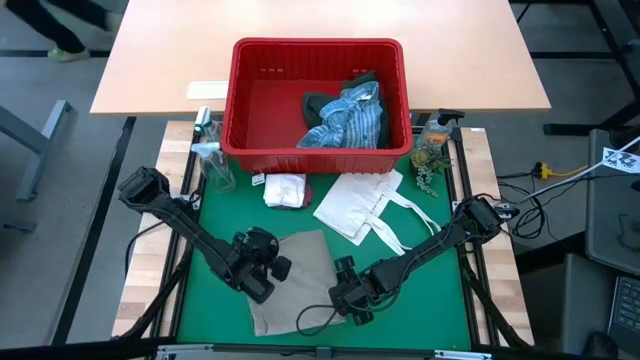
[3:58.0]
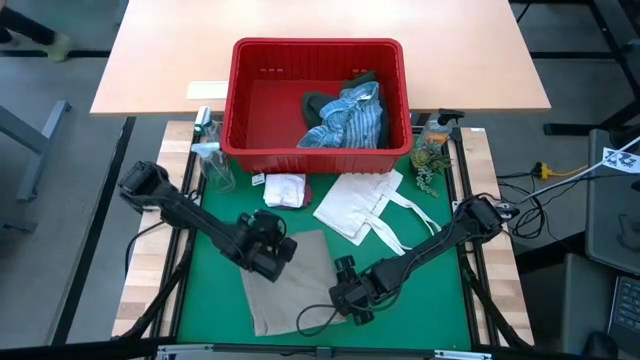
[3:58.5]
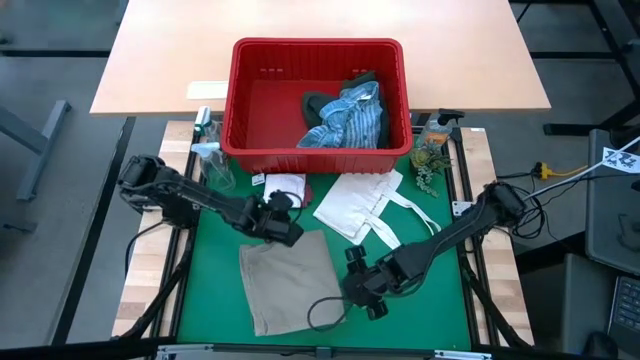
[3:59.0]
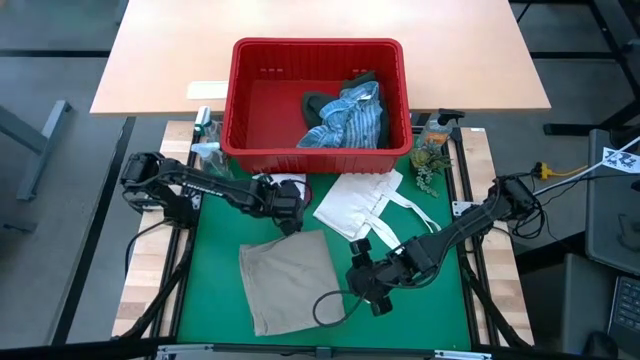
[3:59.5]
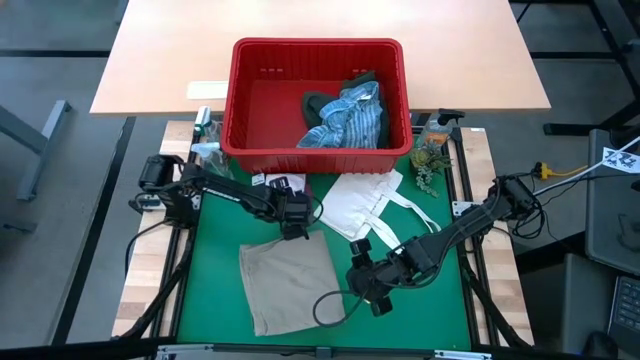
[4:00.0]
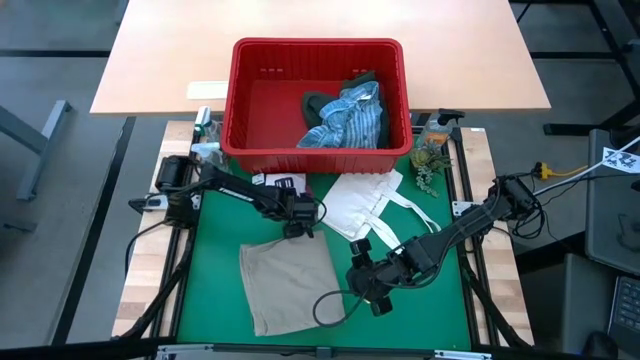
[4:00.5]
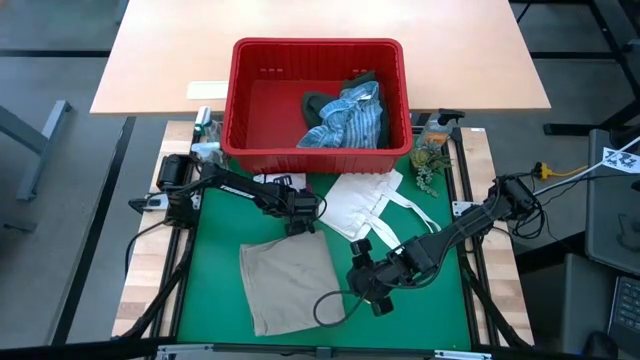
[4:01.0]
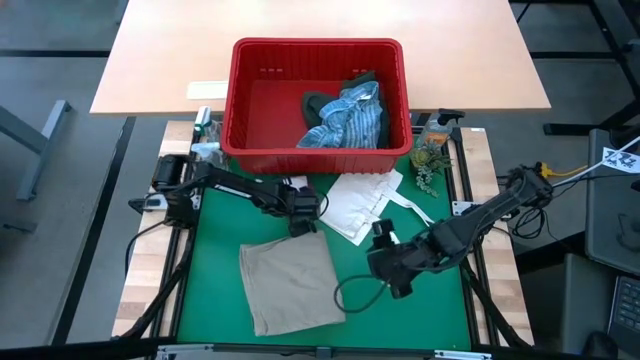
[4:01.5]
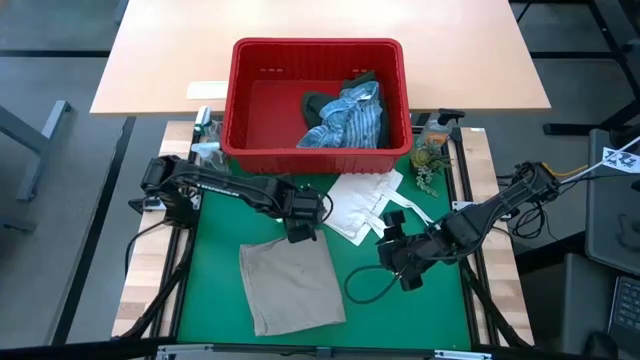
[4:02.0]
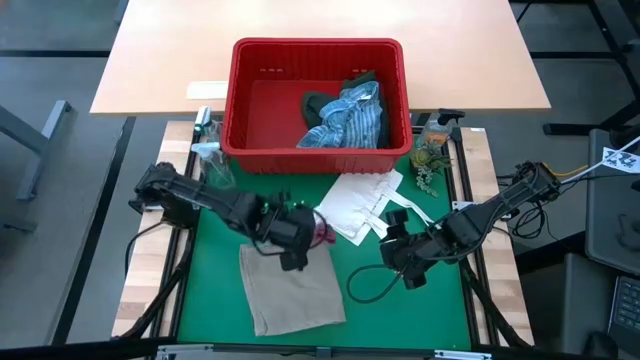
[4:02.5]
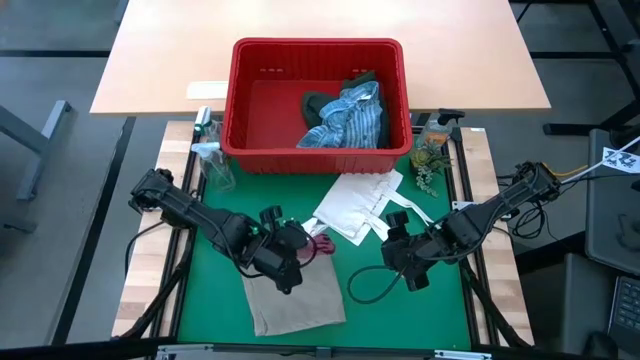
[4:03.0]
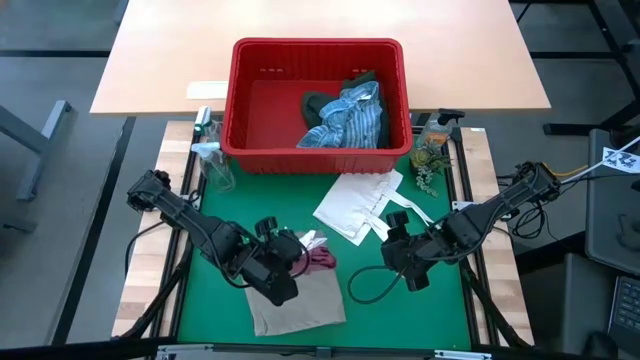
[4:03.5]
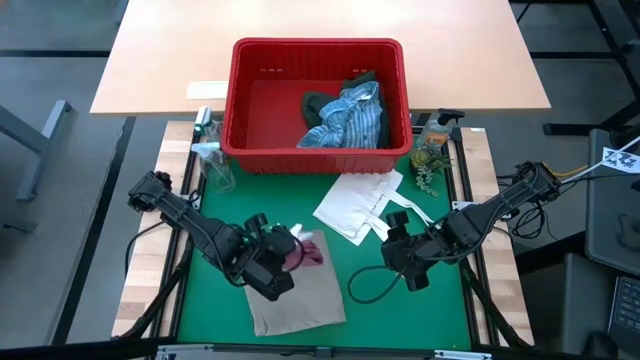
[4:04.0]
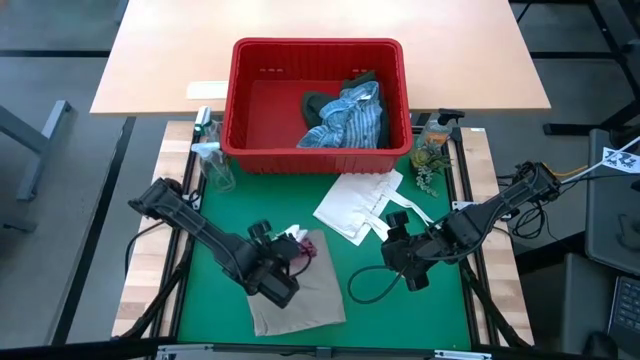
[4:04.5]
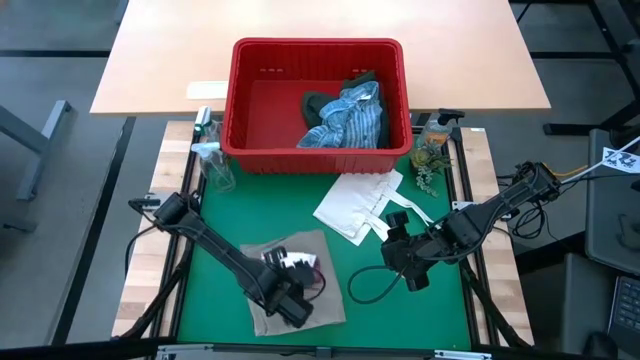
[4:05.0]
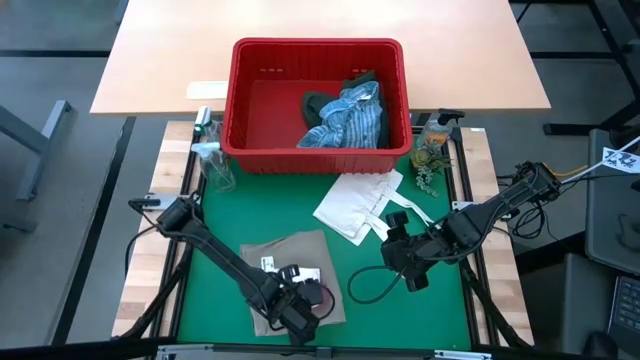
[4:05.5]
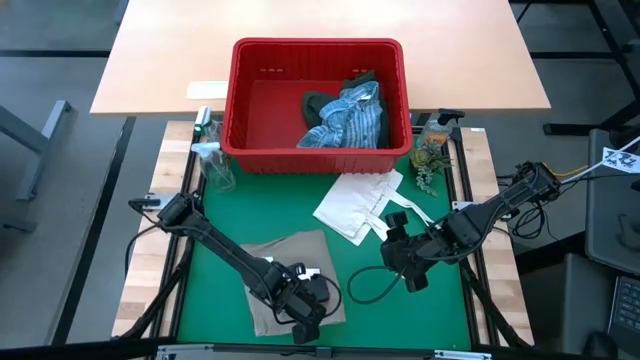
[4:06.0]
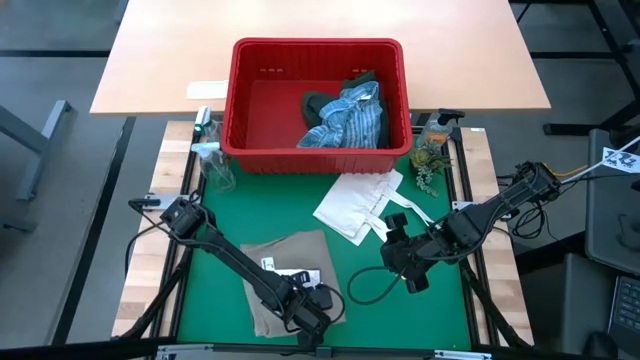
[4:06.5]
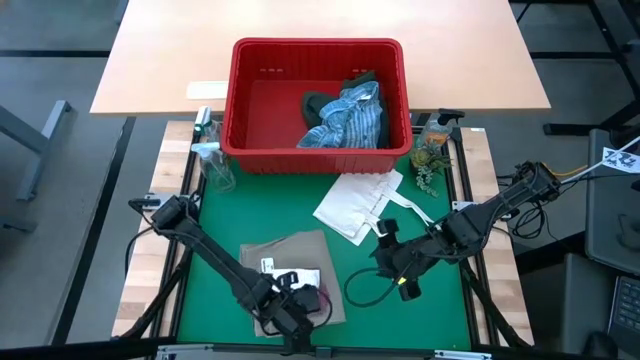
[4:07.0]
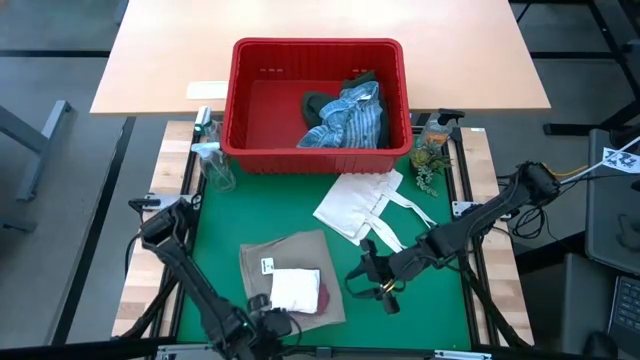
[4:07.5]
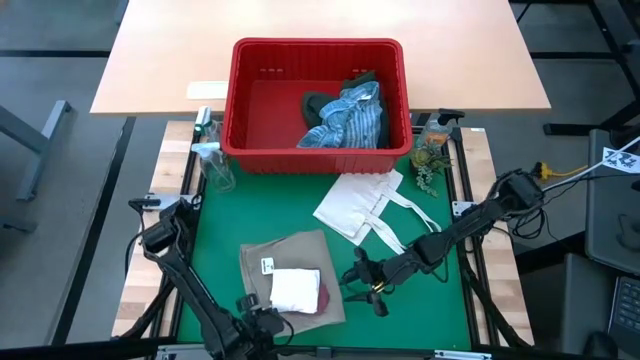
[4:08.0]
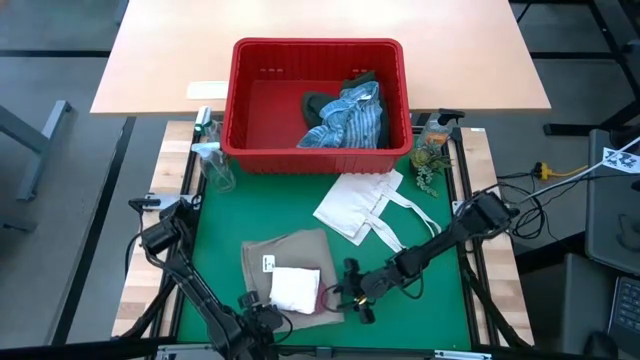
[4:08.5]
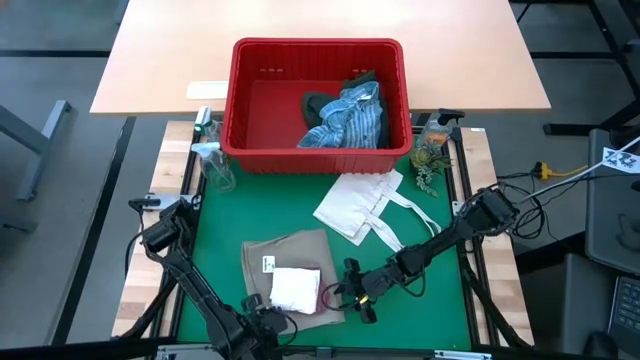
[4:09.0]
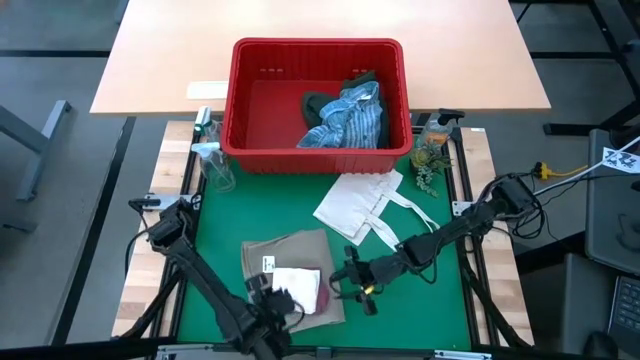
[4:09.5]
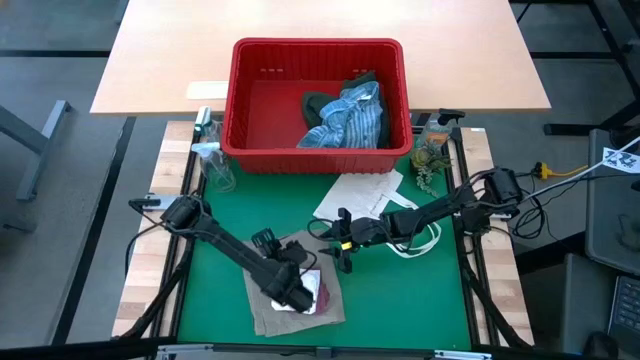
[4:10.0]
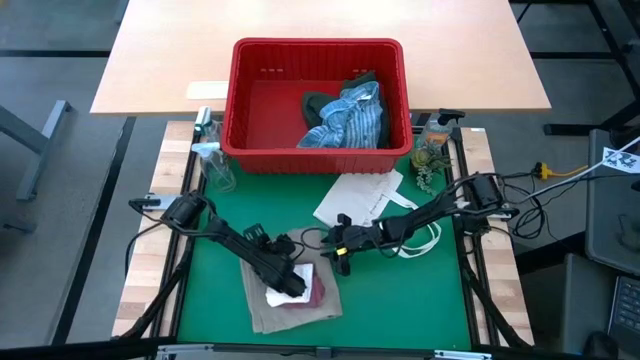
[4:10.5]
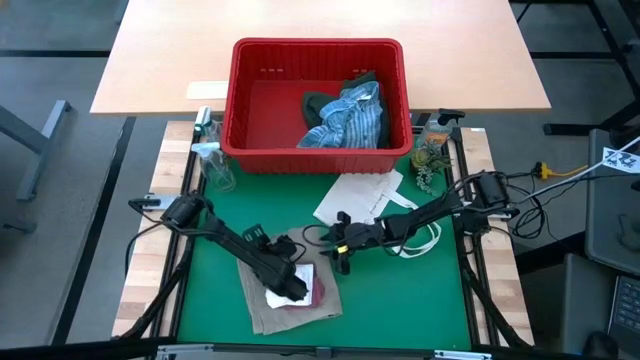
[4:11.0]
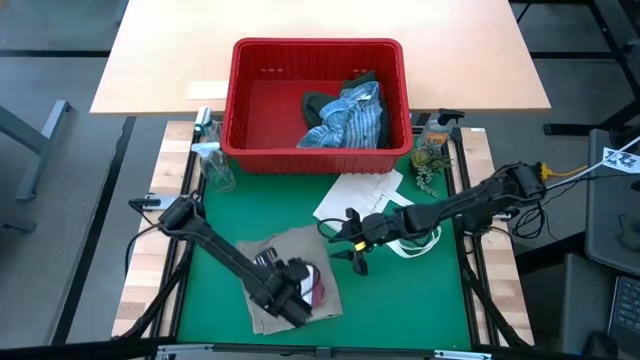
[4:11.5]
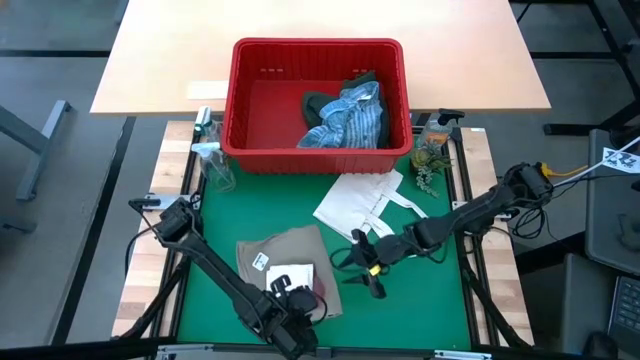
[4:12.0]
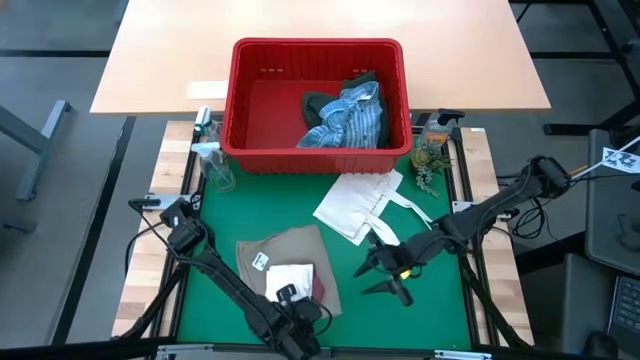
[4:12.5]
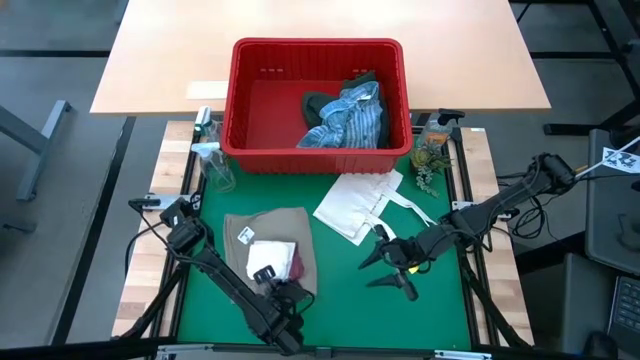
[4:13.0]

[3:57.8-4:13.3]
Task: Fold Laundry from Bin
Stack the folded red and white underwear on top of the gray shorts
